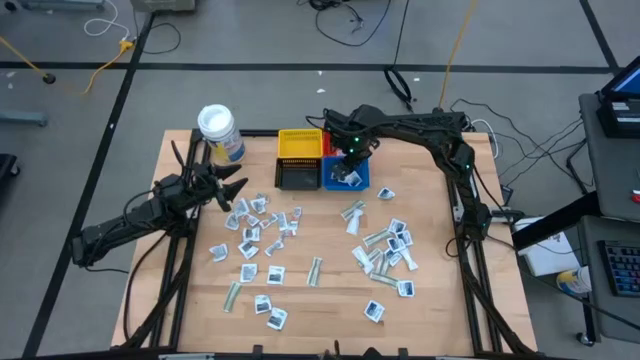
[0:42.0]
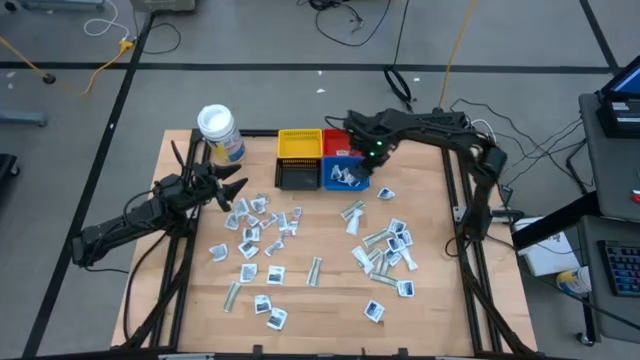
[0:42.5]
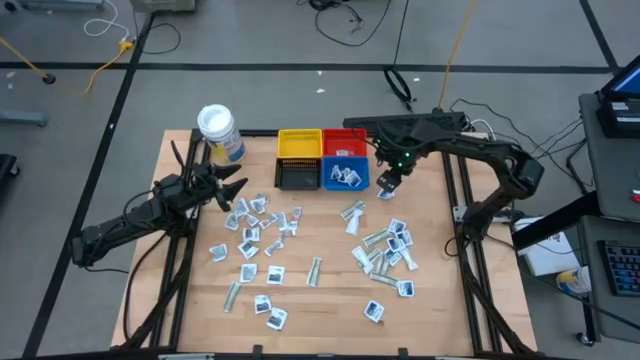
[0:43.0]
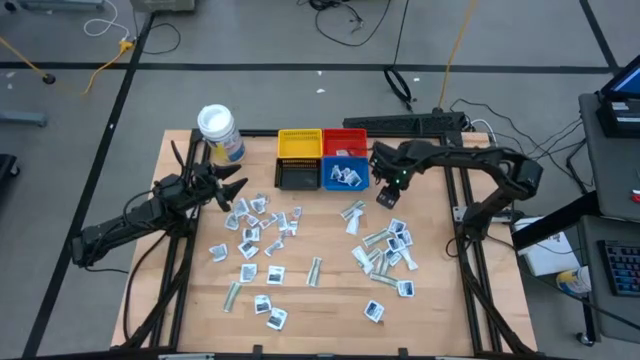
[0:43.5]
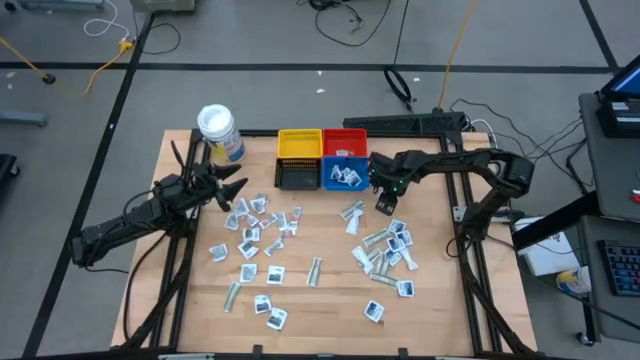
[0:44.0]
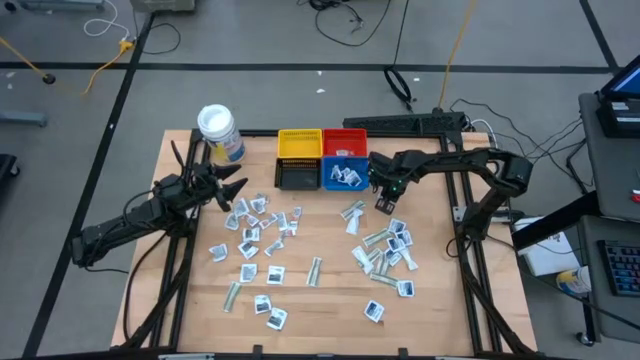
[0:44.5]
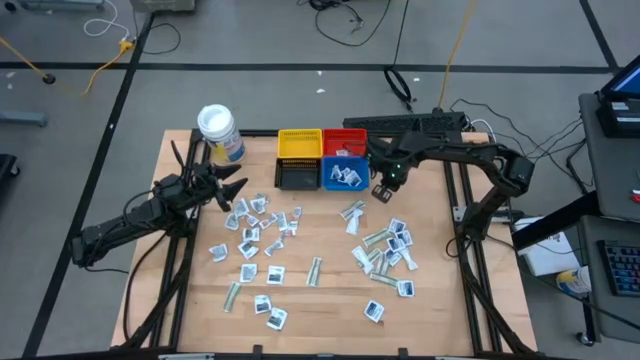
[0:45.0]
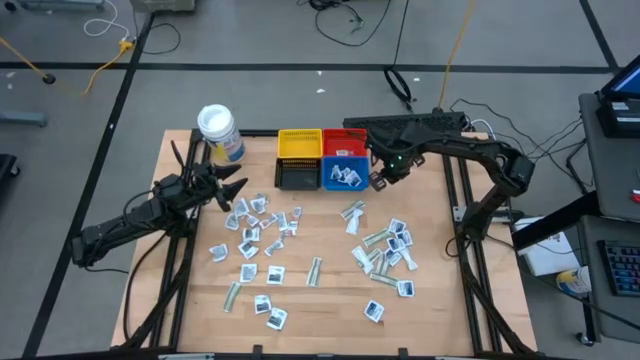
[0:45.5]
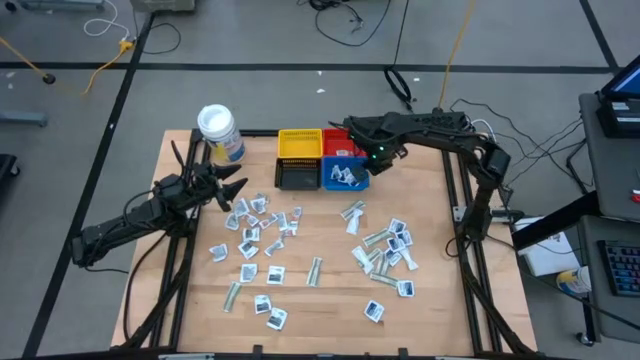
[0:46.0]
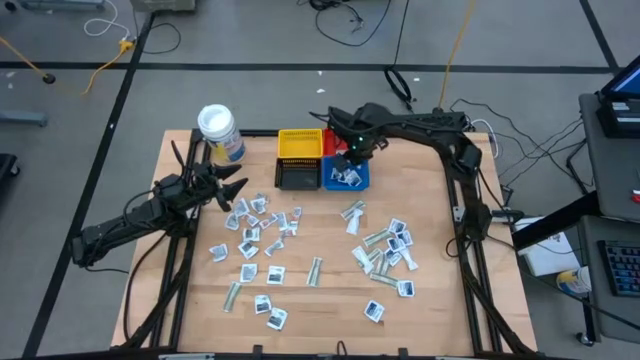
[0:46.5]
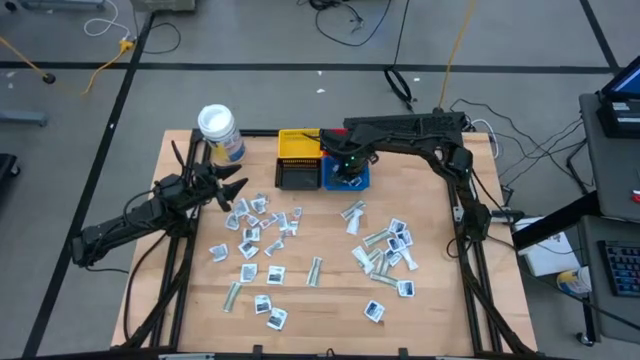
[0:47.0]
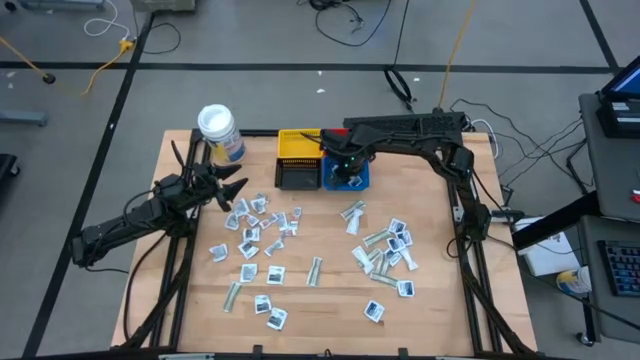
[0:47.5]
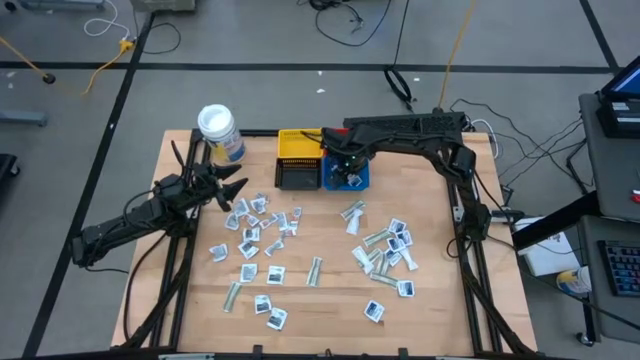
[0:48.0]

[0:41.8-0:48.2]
Task: Pick & Place First Aid Supplies
Put the blue alcohol pad into the blue basket

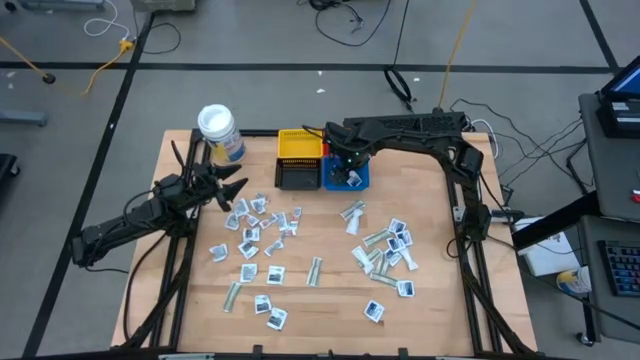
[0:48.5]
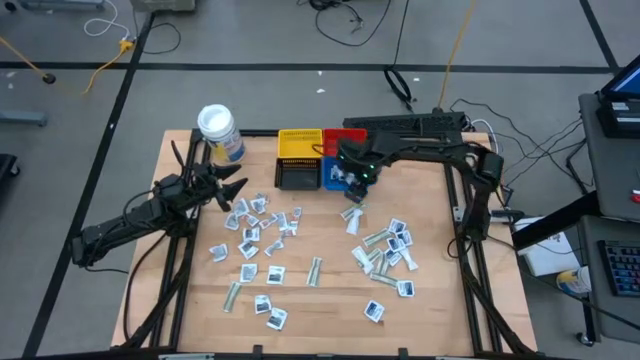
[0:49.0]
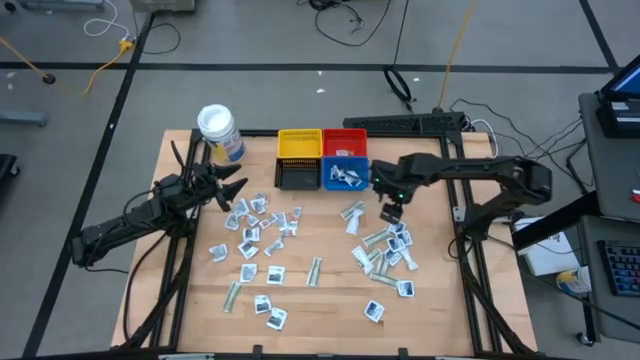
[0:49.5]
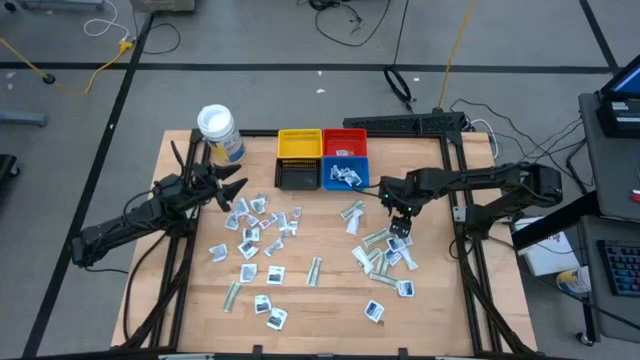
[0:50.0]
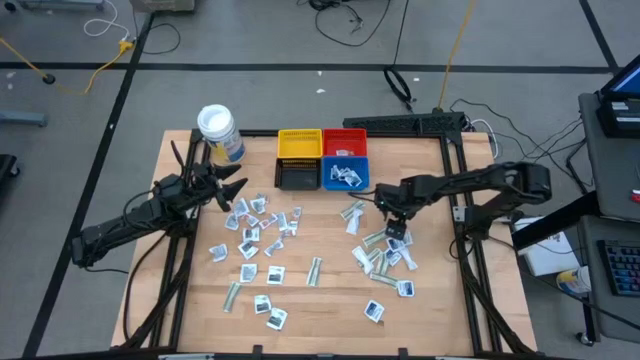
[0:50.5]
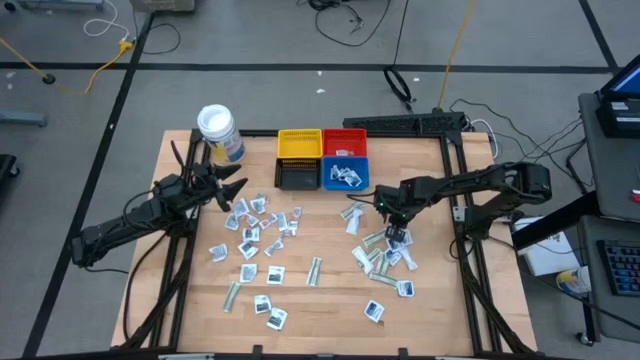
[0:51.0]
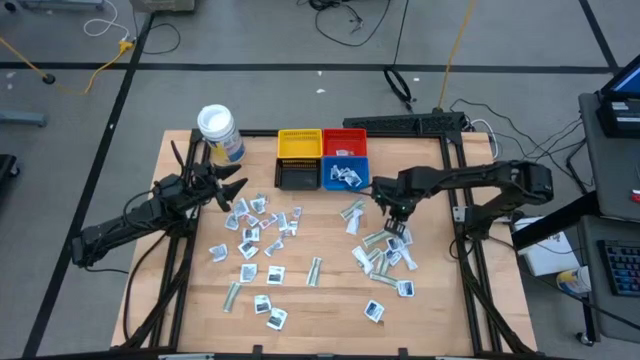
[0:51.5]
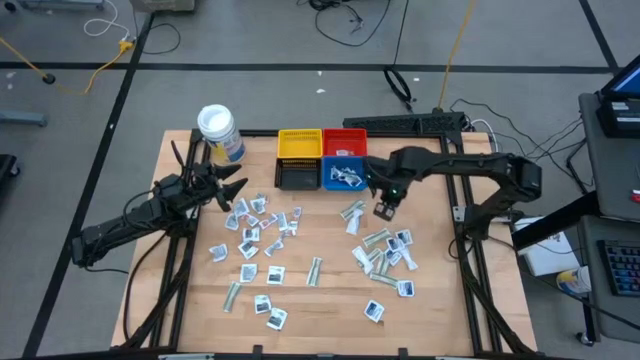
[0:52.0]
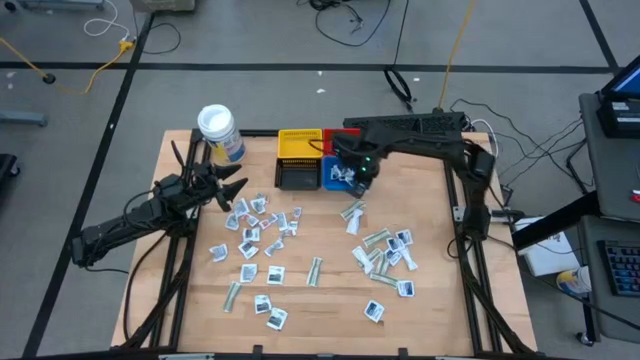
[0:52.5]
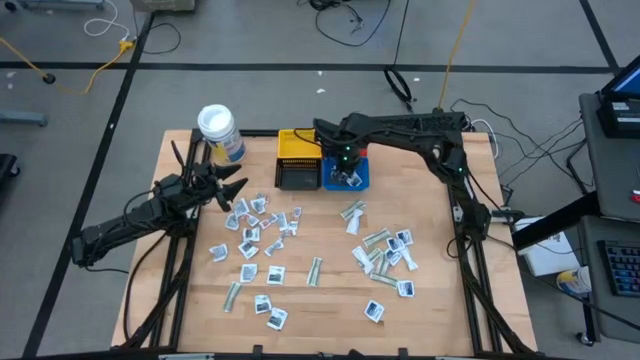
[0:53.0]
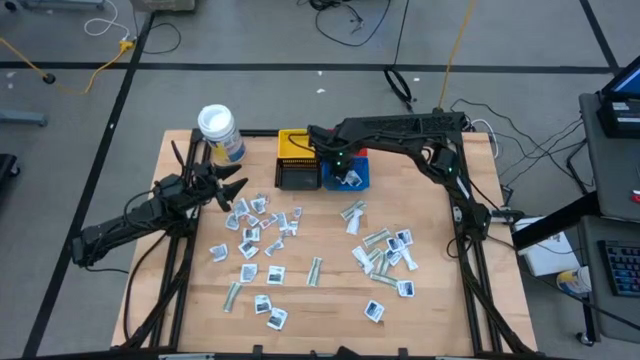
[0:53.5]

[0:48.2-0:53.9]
Put the blue alcohol pad into the blue basket

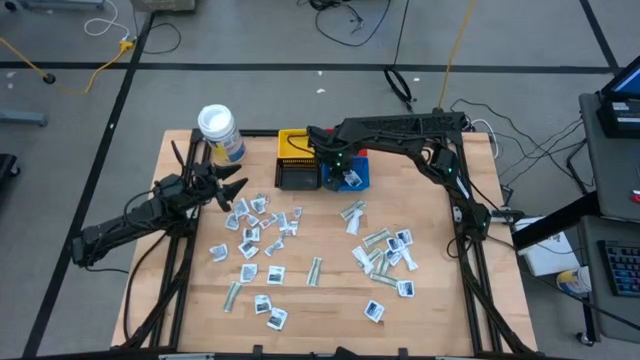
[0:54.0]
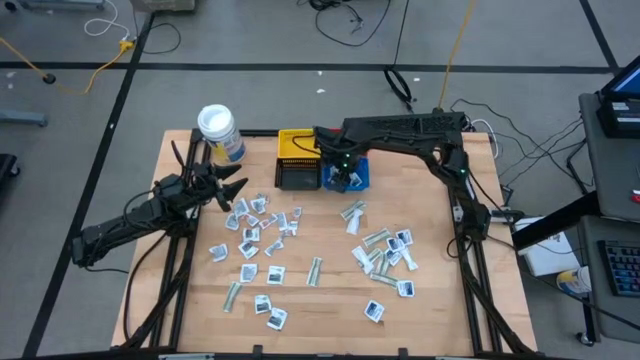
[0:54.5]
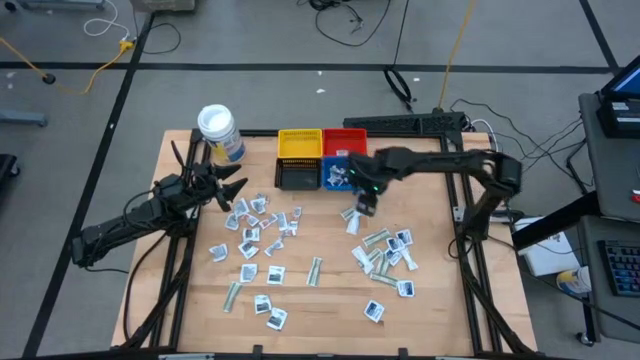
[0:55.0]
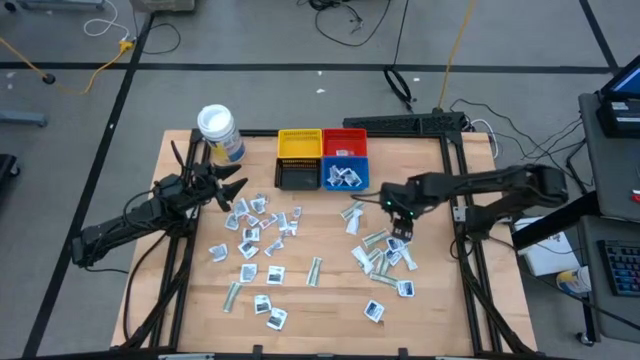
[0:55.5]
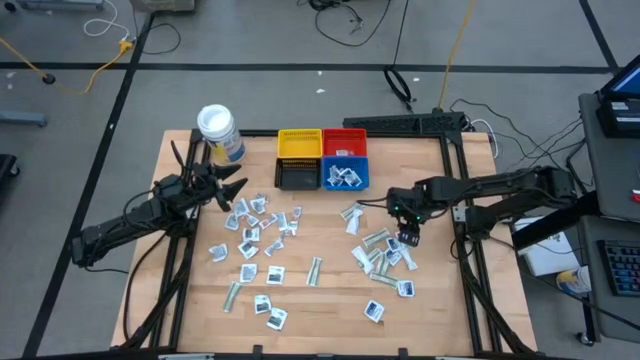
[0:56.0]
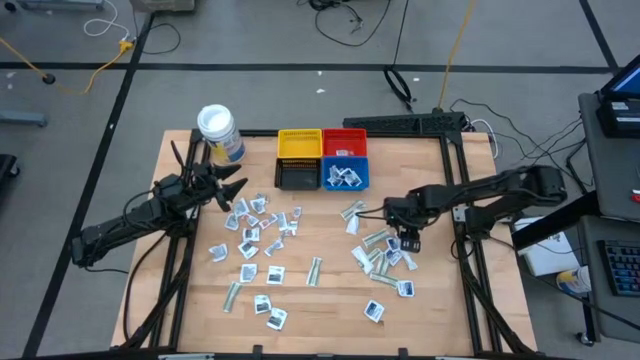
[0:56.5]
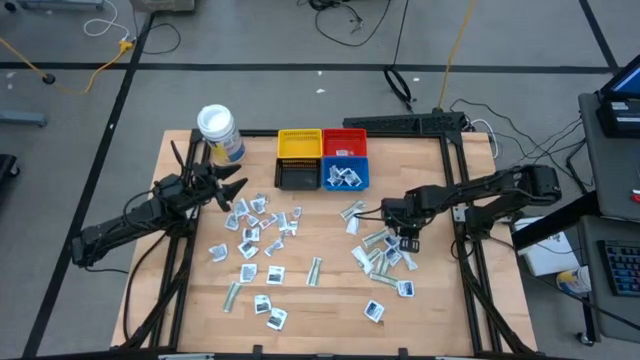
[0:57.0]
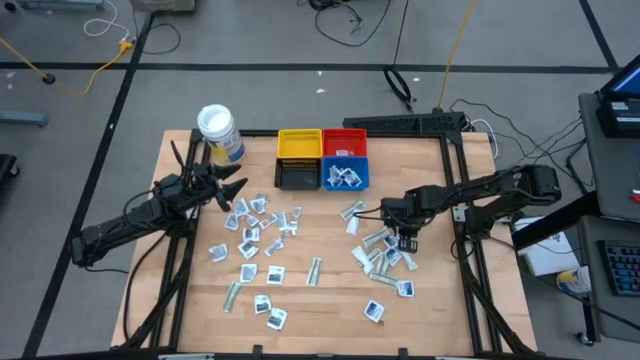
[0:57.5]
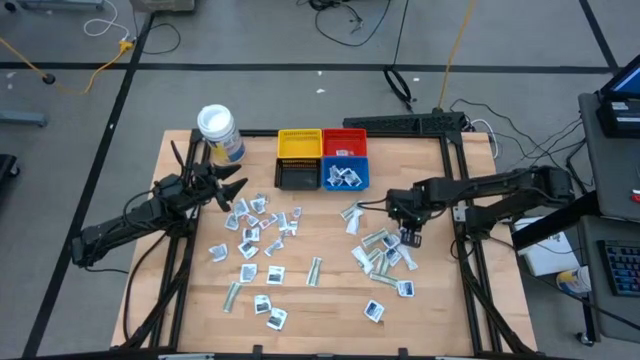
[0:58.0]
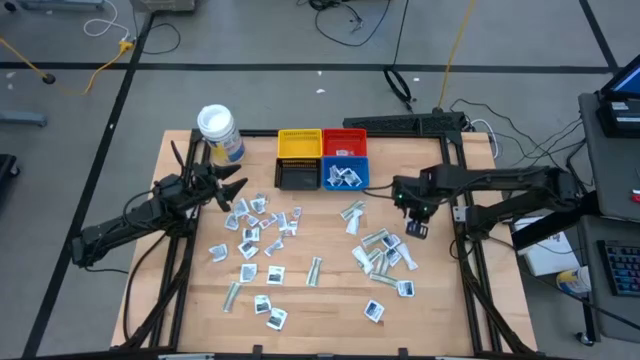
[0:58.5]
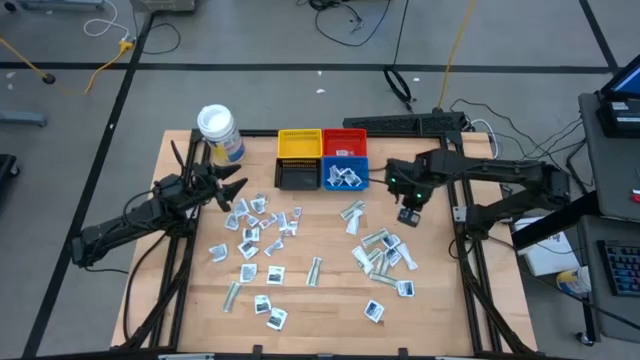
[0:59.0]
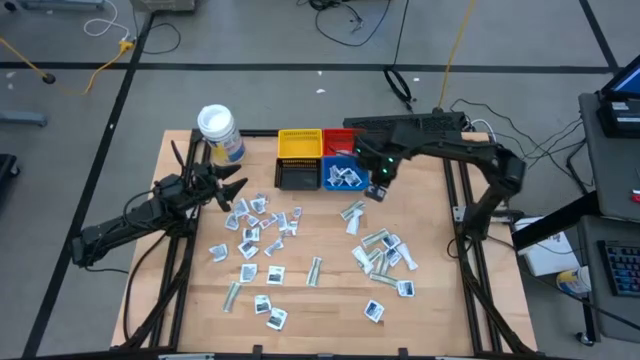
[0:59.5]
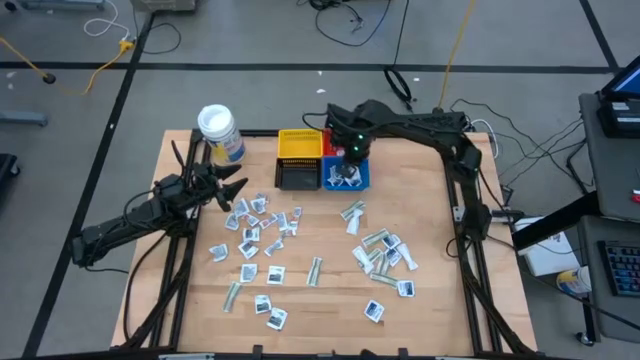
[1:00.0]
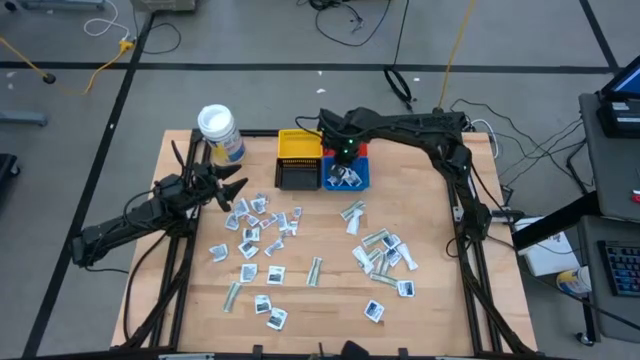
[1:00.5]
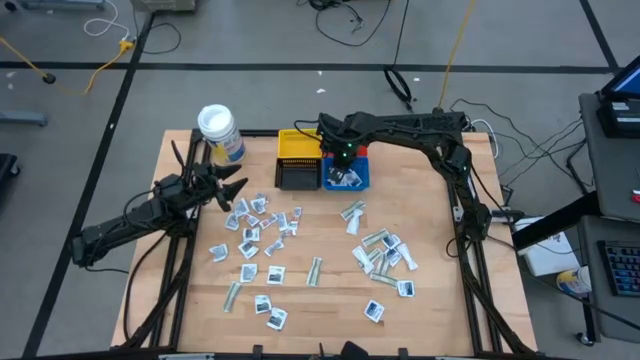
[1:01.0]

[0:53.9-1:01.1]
Put the blue alcohol pad into the blue basket

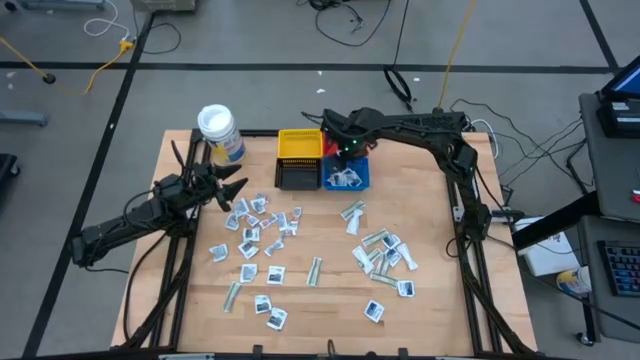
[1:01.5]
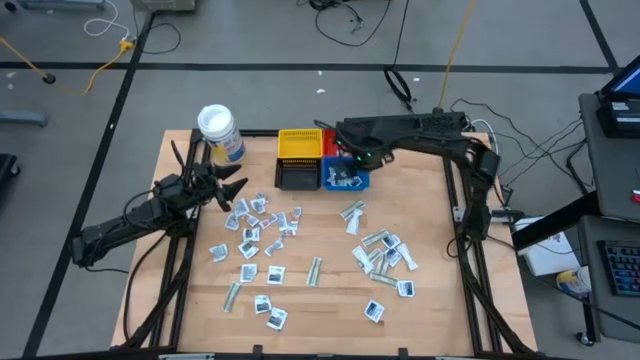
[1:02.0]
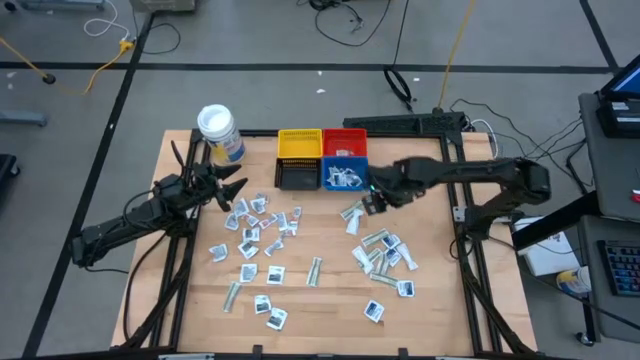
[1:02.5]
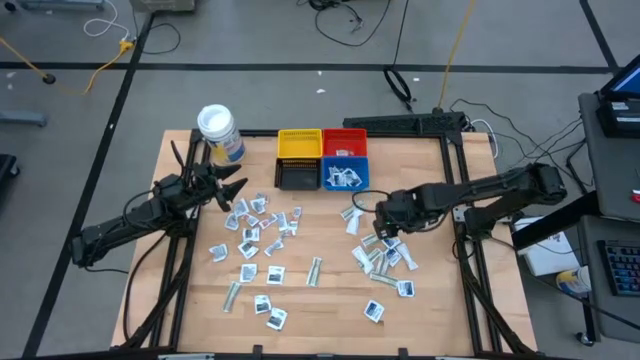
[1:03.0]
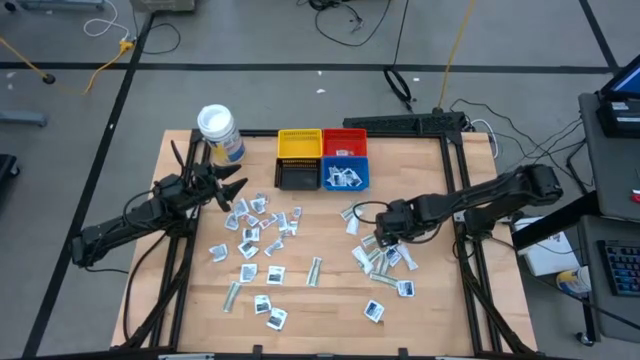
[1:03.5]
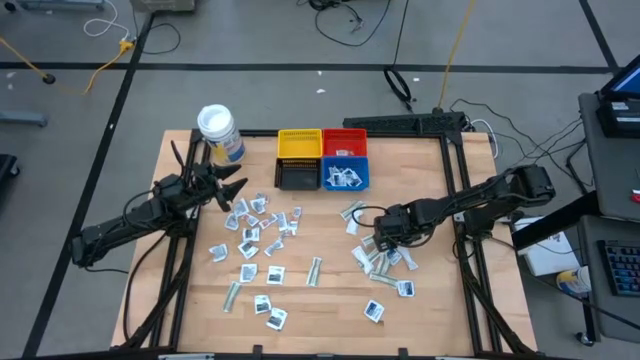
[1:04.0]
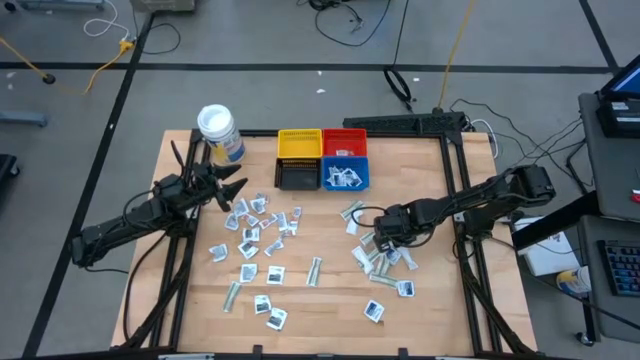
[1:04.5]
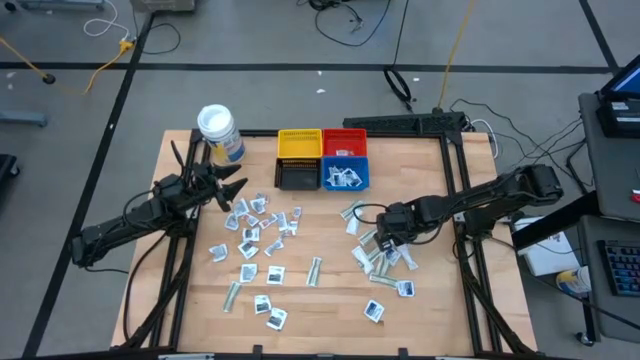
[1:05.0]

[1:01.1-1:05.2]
Put the blue alcohol pad into the blue basket
